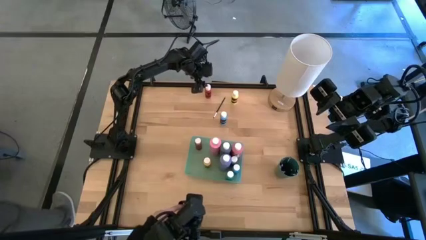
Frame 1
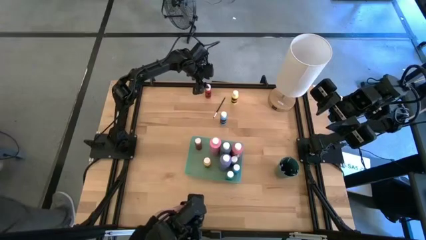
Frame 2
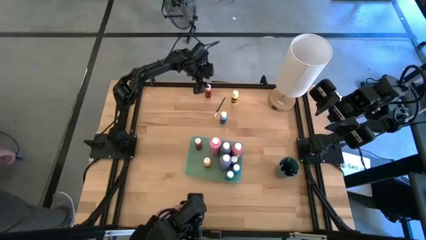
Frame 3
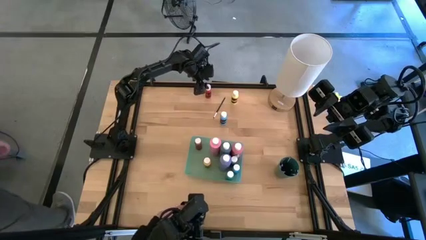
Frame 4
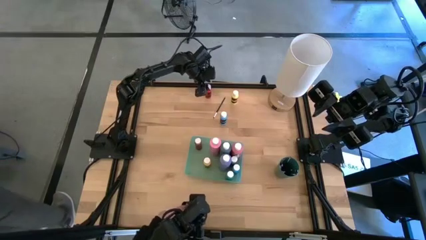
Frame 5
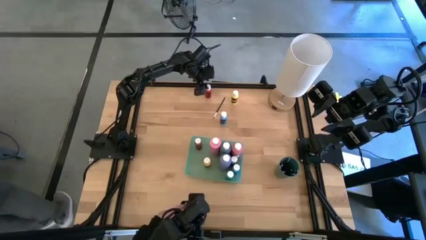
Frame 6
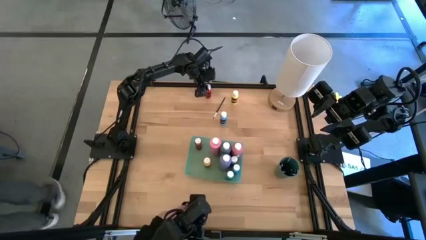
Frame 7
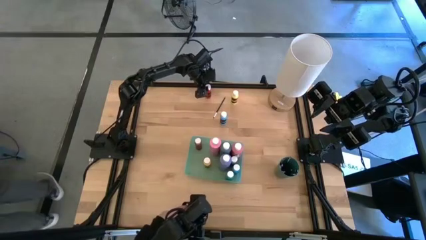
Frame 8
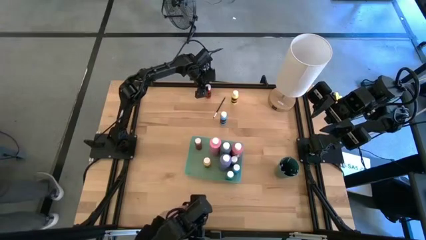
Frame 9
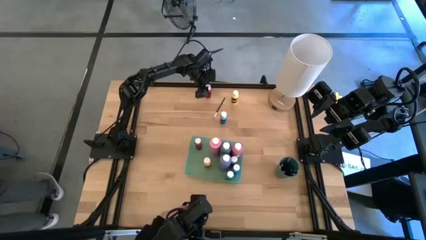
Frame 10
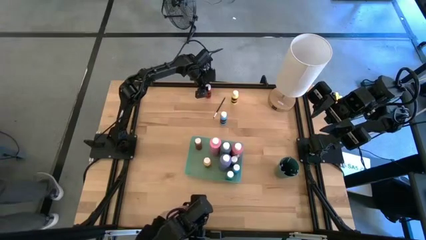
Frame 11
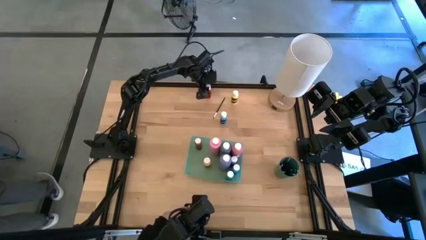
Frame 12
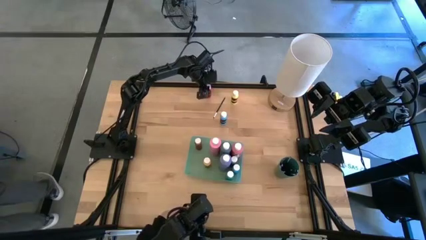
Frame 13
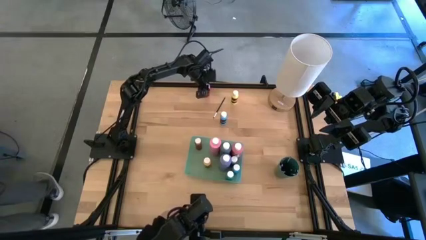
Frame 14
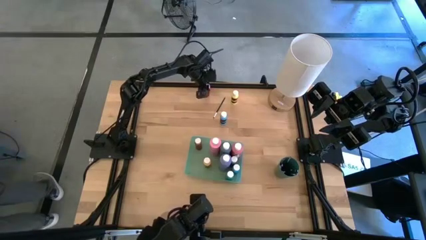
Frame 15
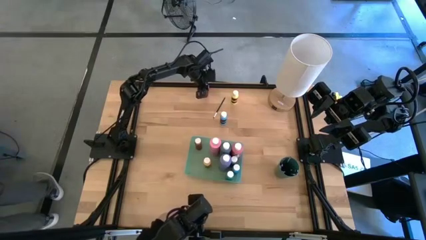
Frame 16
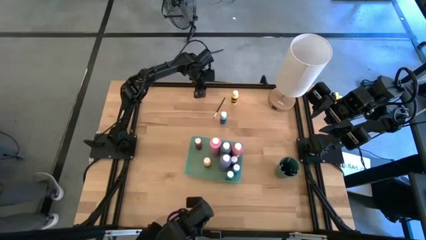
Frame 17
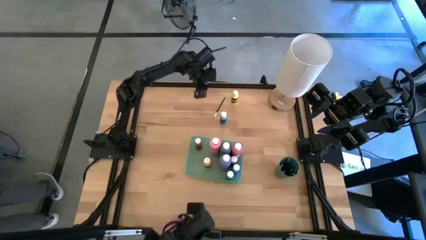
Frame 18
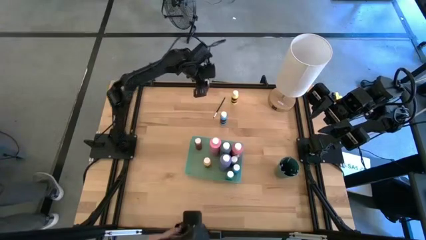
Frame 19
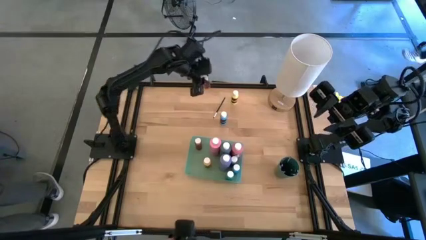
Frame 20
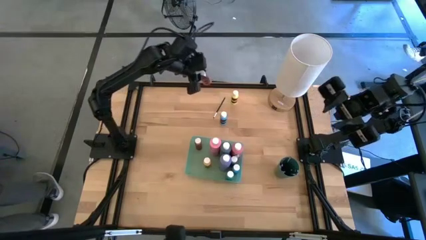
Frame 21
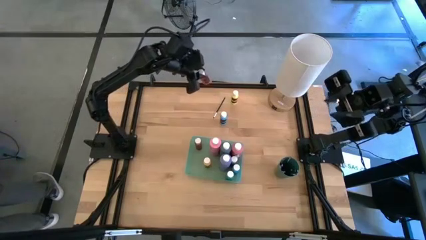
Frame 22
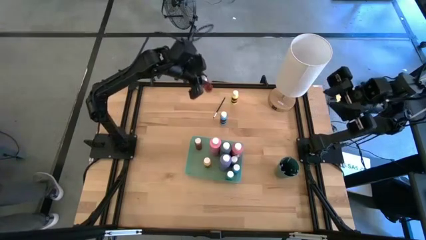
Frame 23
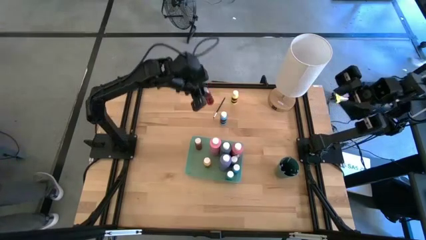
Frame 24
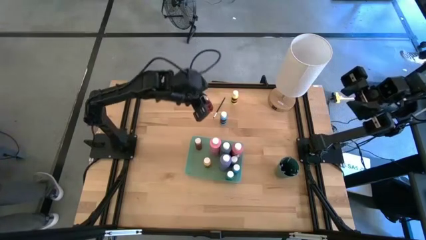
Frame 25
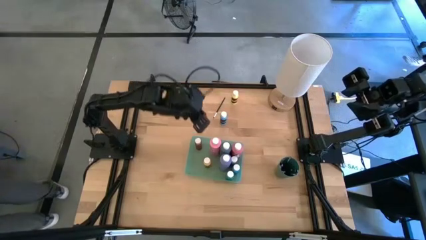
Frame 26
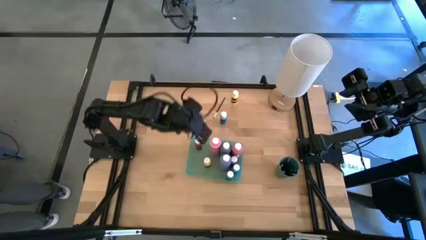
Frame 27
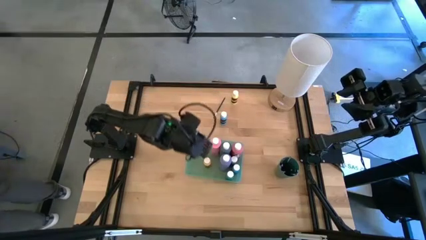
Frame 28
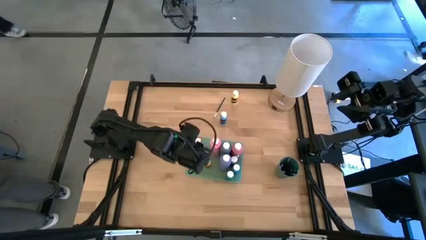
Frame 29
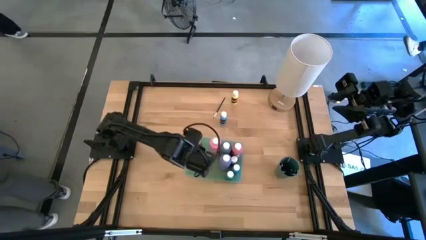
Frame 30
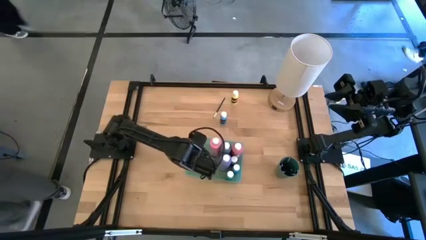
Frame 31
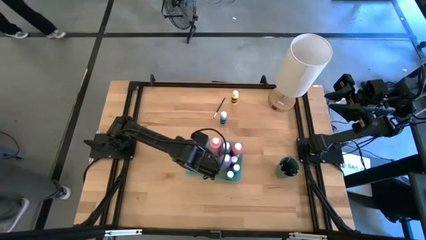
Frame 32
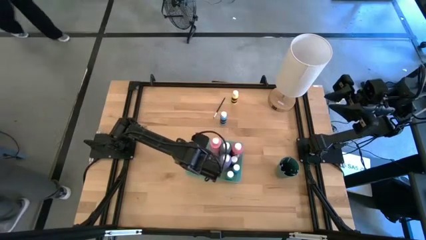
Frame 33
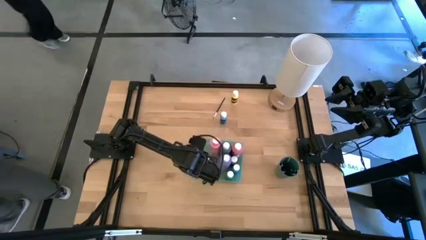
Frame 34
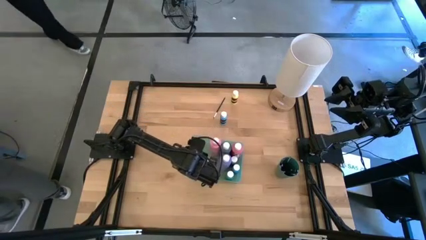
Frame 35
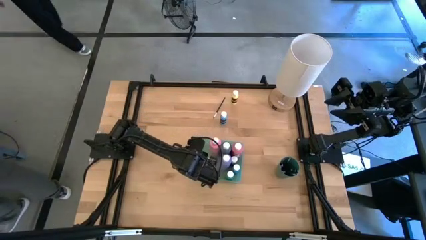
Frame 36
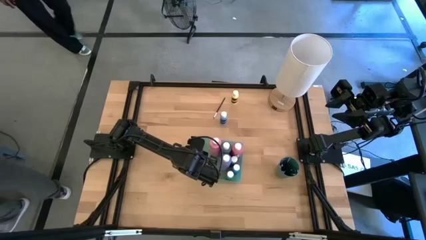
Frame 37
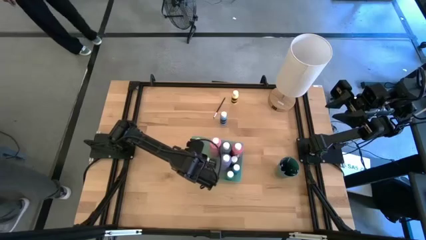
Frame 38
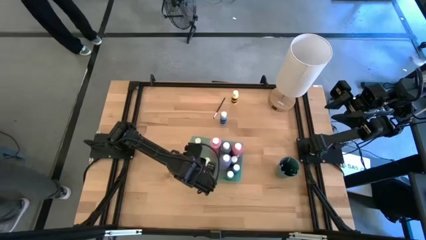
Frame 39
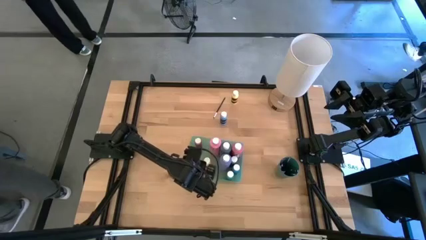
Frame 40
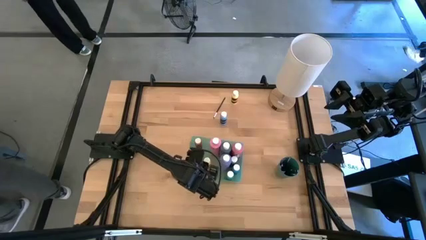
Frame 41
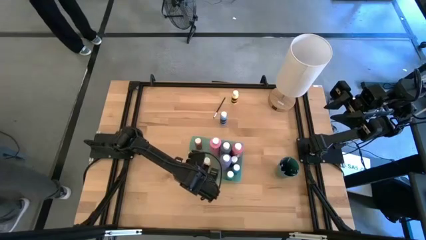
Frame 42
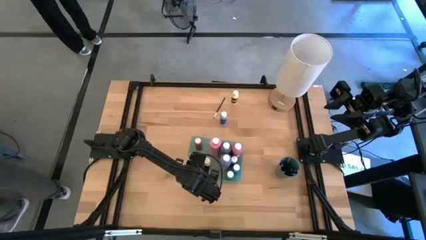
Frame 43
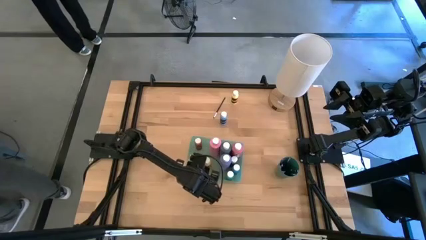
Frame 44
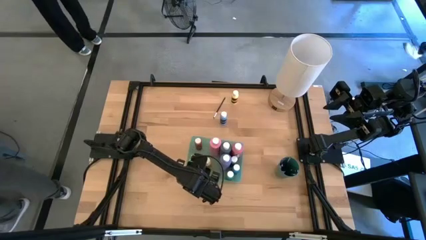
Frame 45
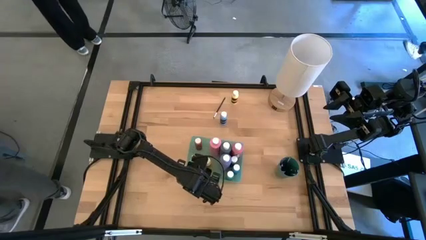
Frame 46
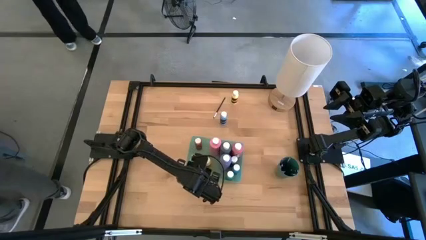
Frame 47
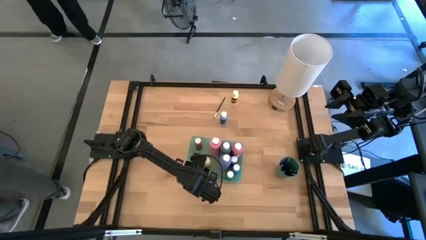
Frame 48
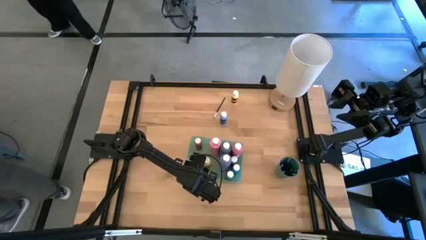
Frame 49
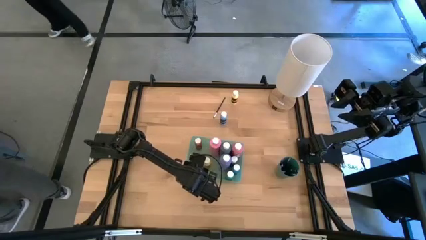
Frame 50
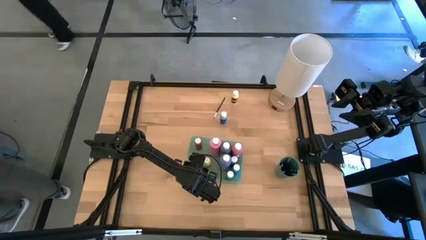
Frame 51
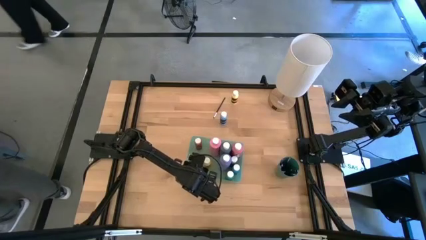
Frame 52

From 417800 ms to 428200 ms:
Task: Pick & Place Paint Supplies
Put the small red paint bottle into the light green bin
